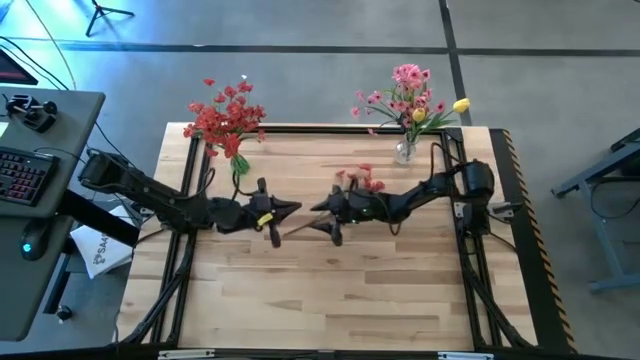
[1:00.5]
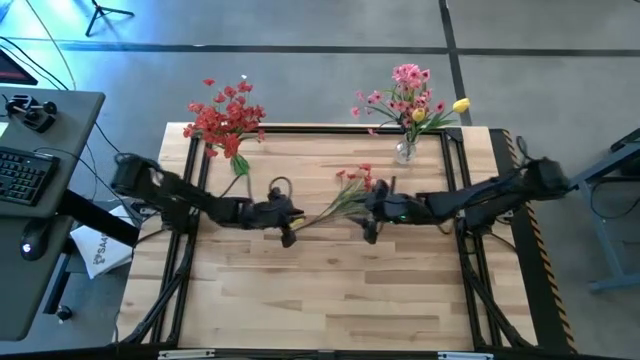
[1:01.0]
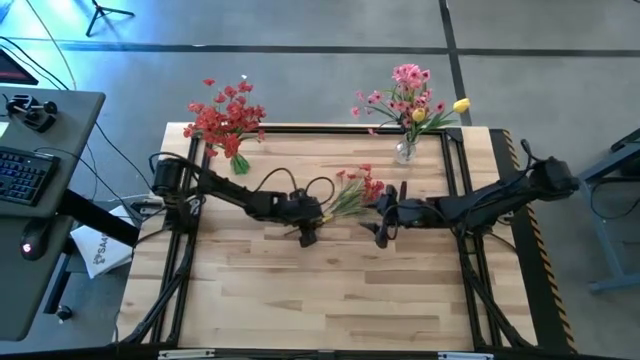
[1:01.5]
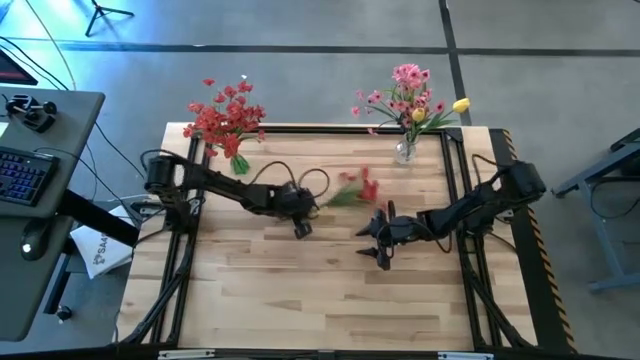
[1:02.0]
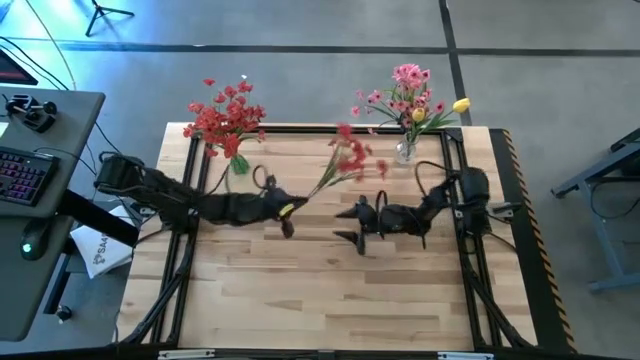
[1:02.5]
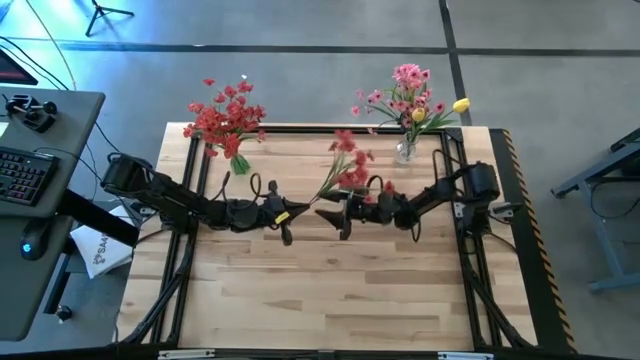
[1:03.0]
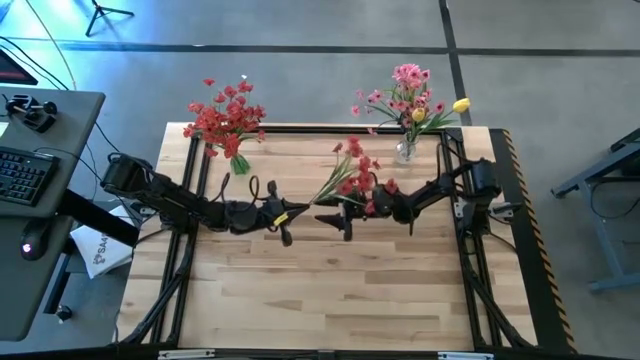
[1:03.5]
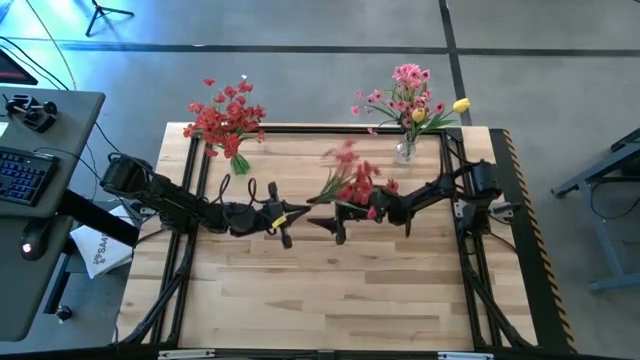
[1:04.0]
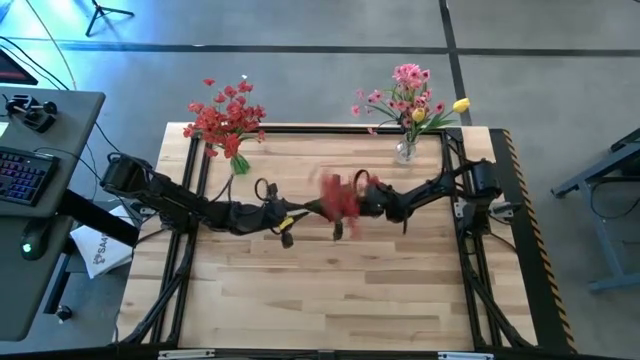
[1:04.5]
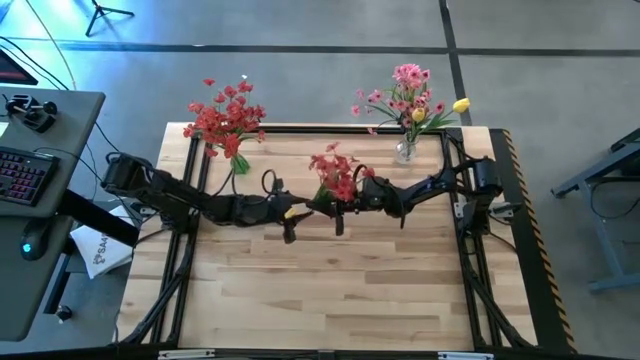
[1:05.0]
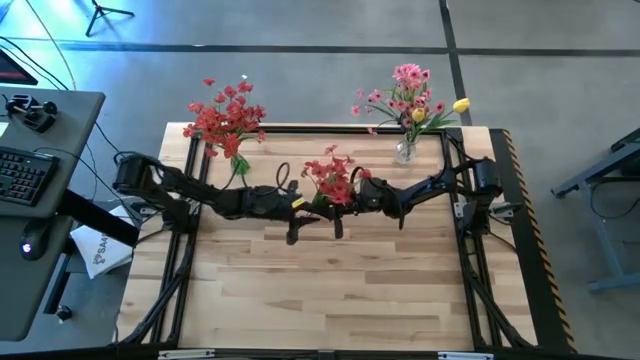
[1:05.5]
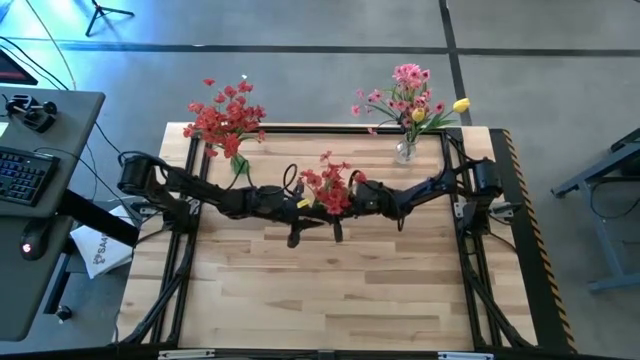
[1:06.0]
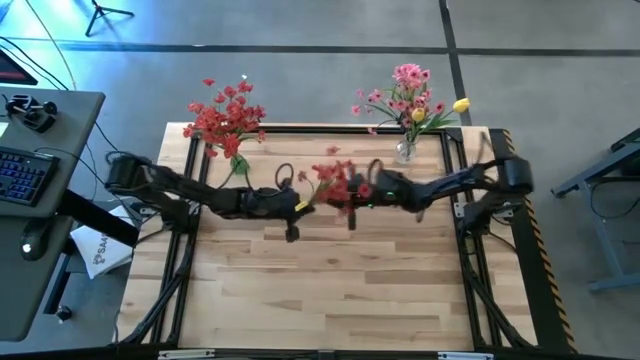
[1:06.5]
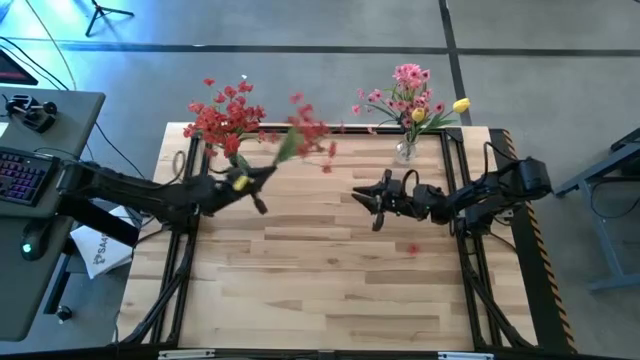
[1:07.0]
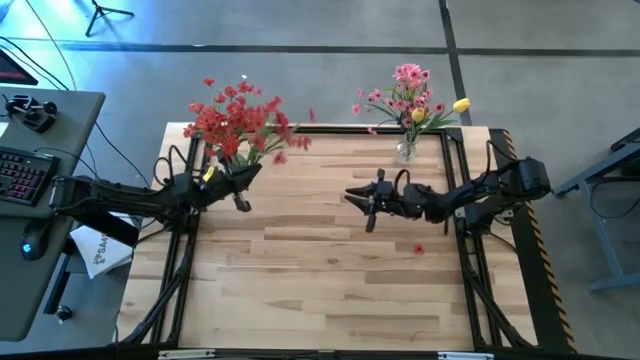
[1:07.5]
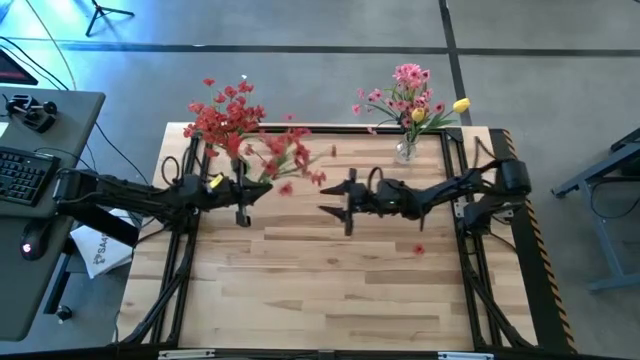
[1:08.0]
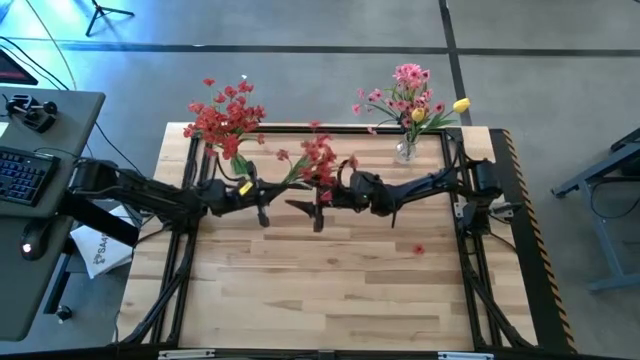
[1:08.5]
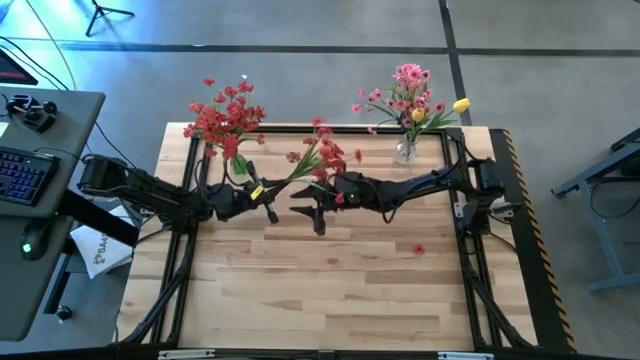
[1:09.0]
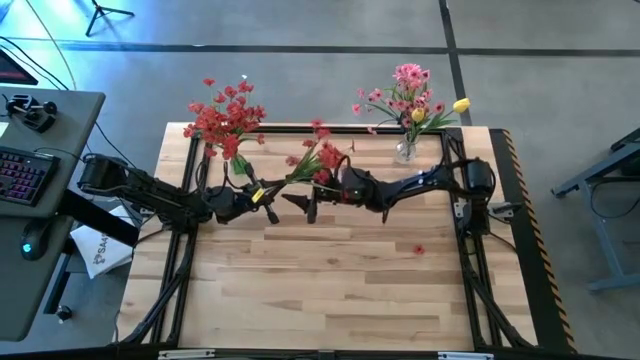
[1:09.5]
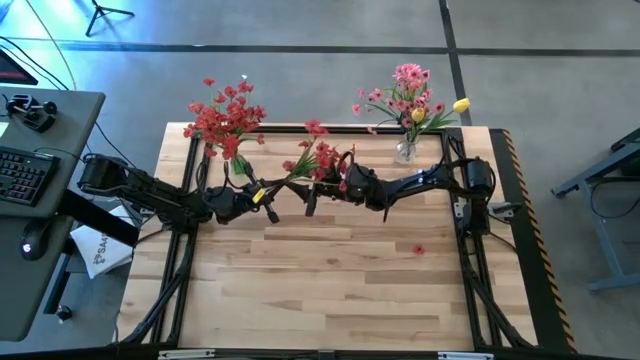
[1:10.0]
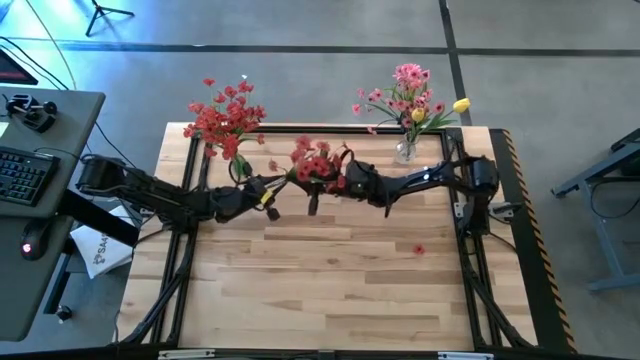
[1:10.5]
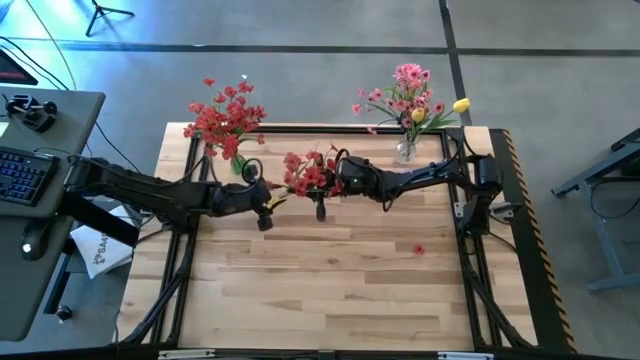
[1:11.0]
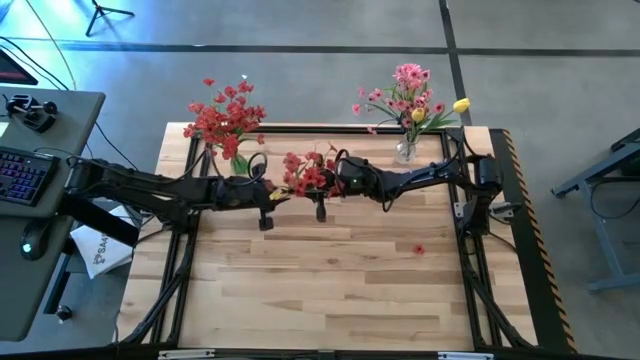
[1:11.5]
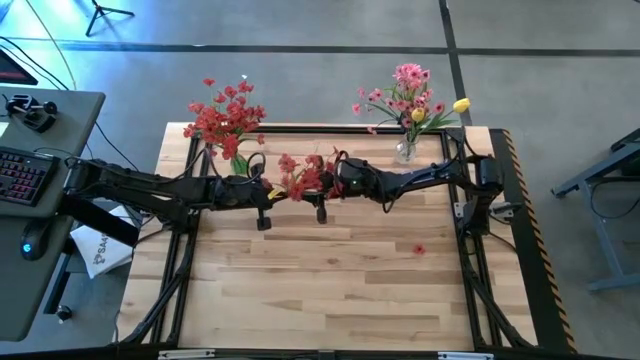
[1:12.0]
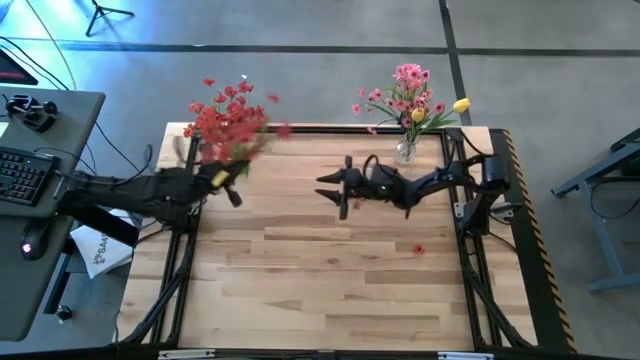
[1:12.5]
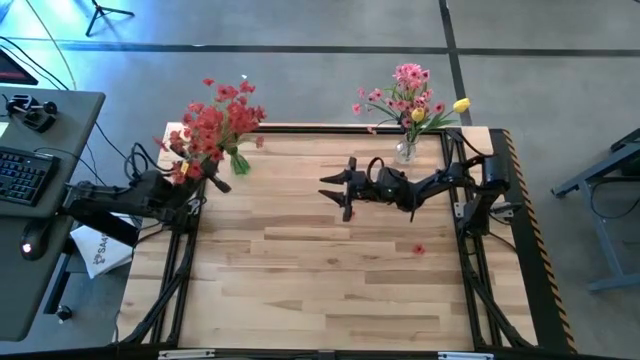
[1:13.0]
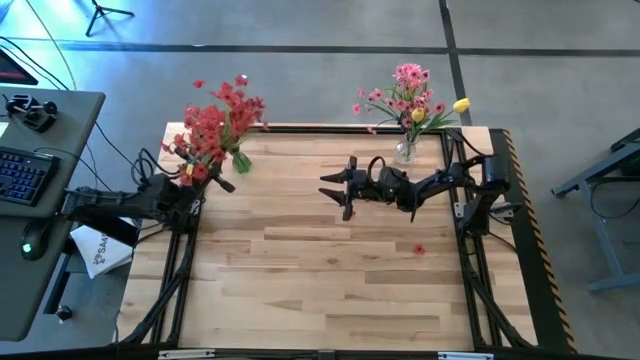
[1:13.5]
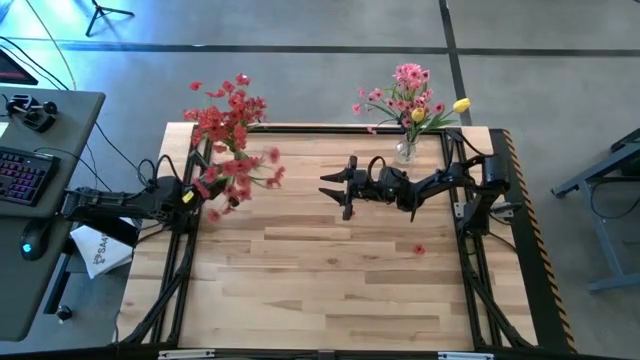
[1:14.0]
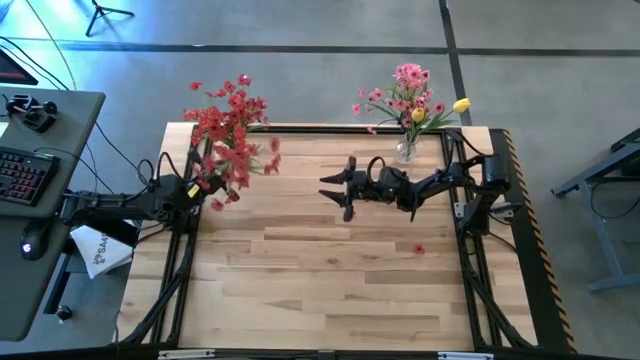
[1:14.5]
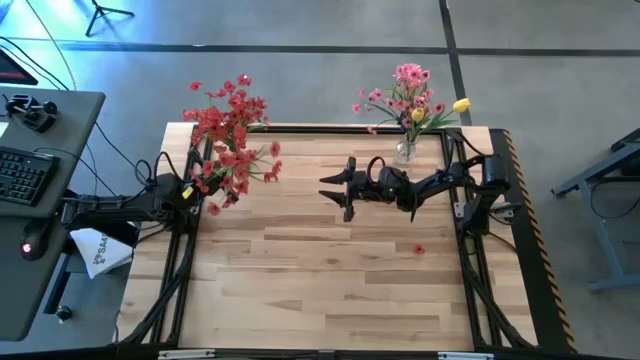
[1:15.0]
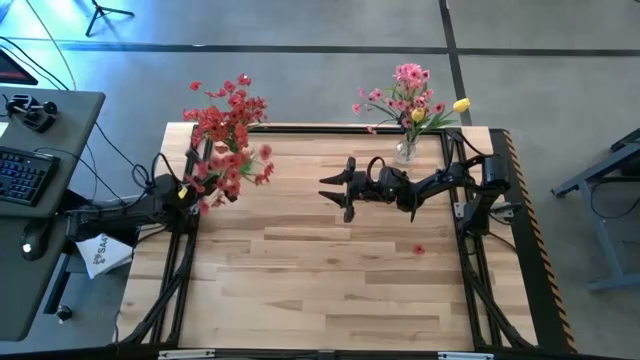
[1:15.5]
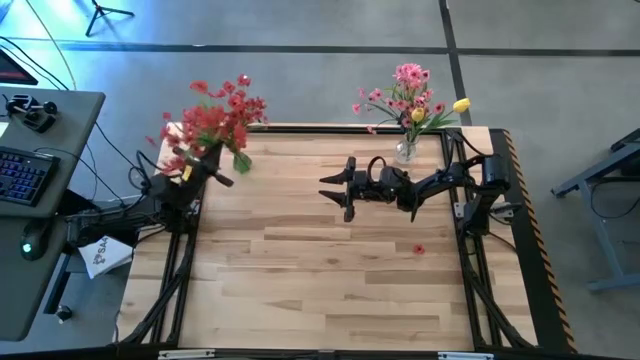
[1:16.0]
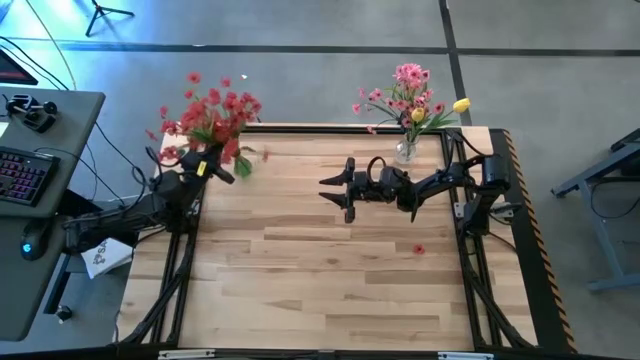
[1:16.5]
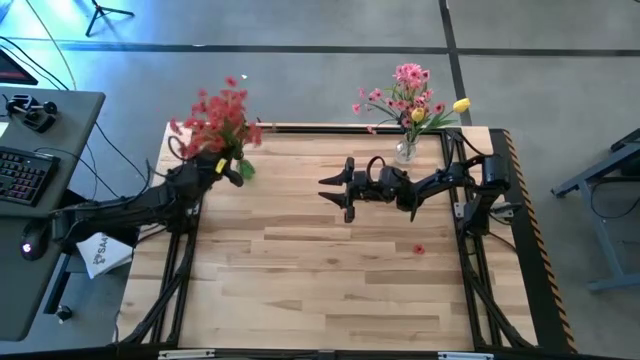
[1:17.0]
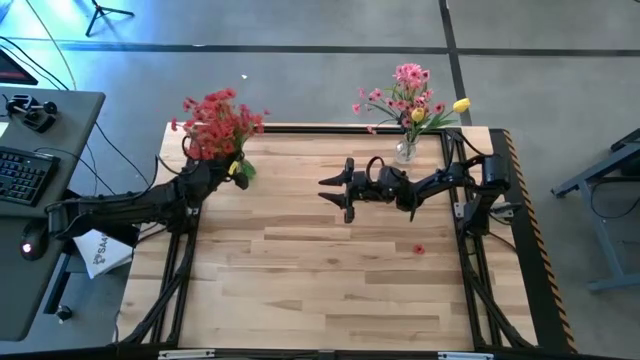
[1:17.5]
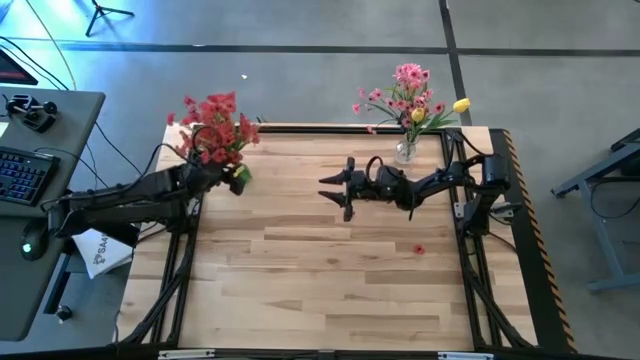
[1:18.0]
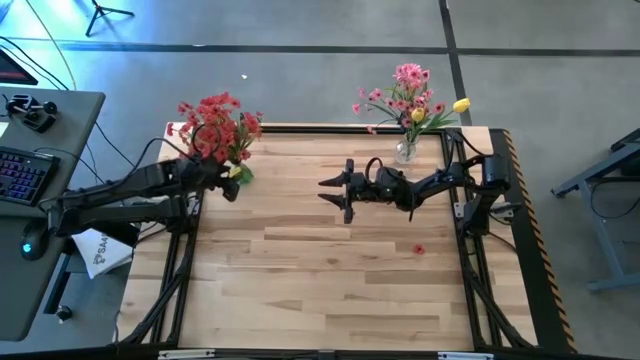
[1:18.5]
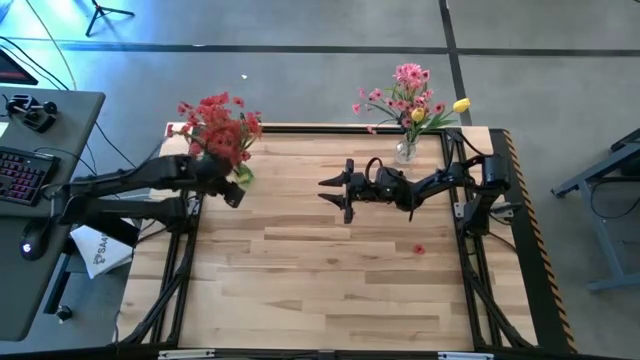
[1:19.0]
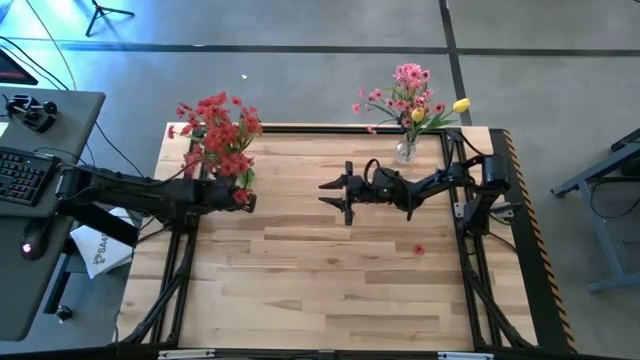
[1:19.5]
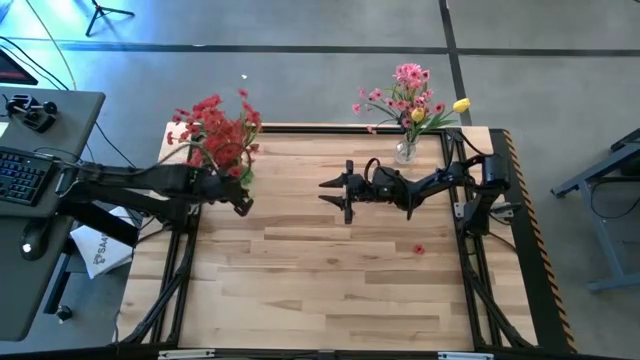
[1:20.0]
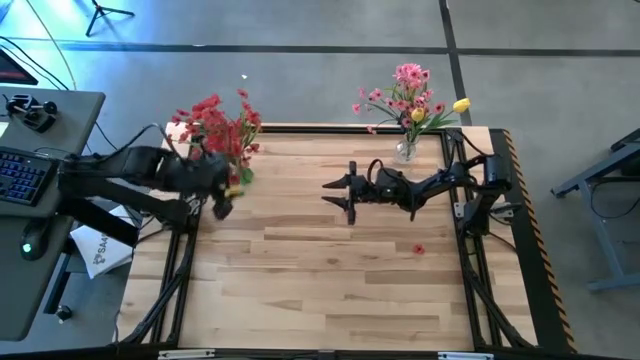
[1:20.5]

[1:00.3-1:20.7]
Task: Sort flowers into vase by color
Put the red flowers into the green vase
